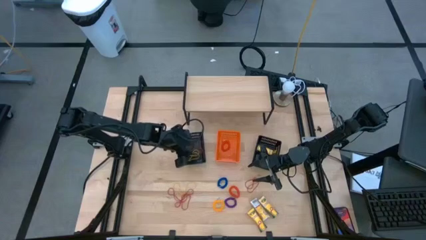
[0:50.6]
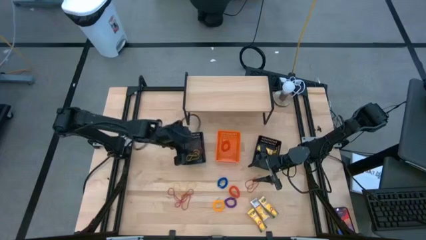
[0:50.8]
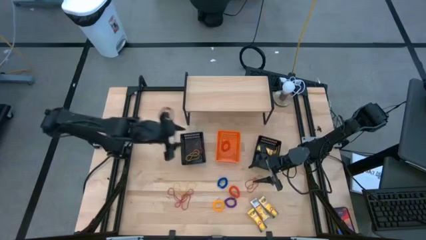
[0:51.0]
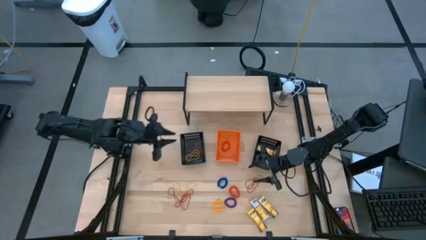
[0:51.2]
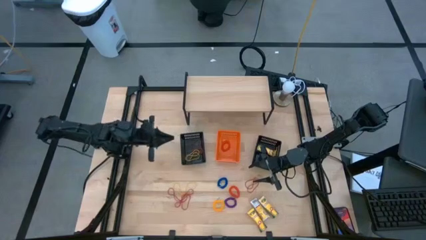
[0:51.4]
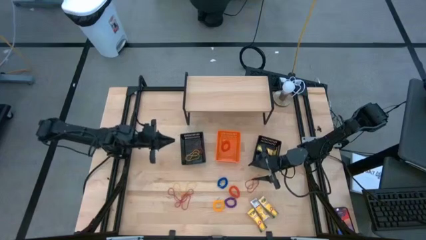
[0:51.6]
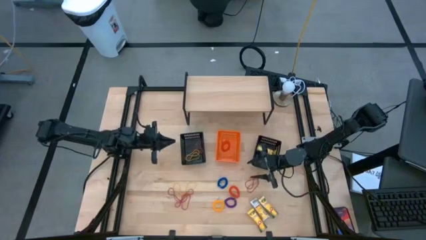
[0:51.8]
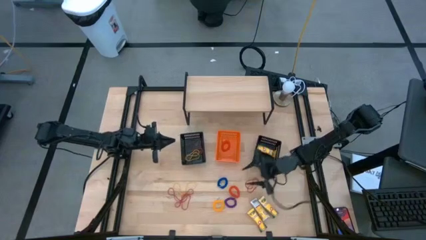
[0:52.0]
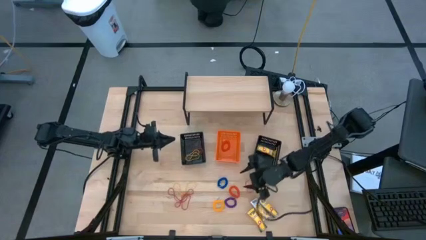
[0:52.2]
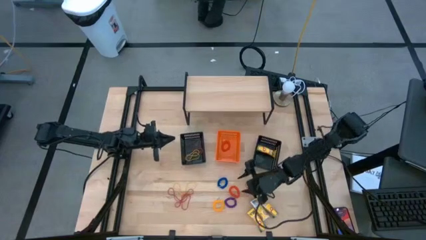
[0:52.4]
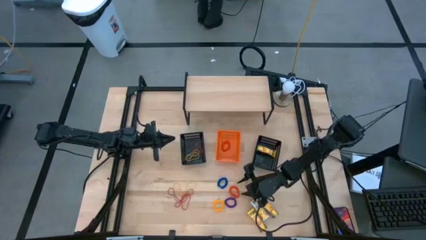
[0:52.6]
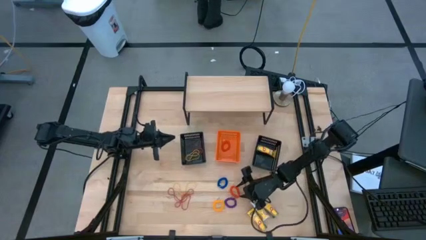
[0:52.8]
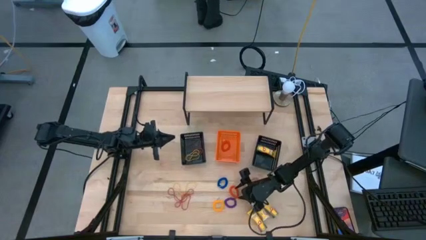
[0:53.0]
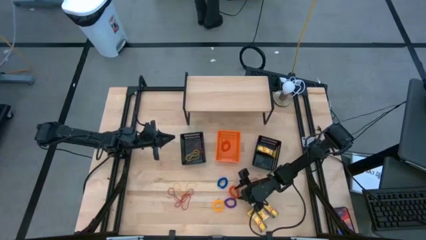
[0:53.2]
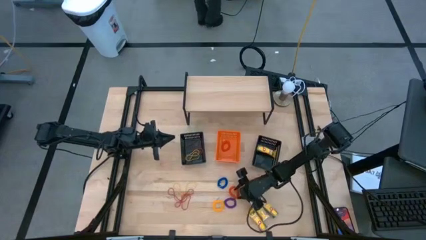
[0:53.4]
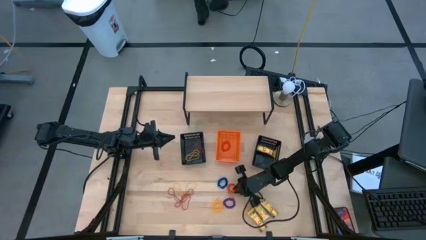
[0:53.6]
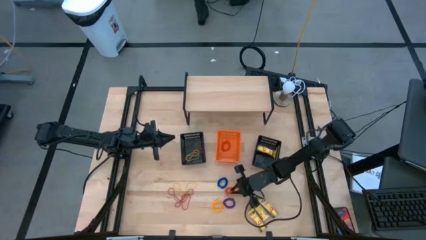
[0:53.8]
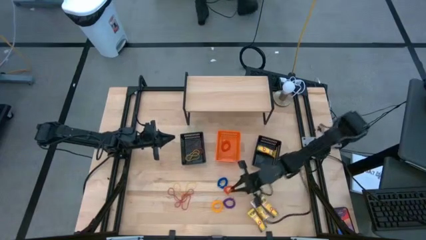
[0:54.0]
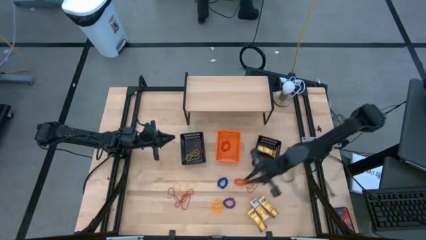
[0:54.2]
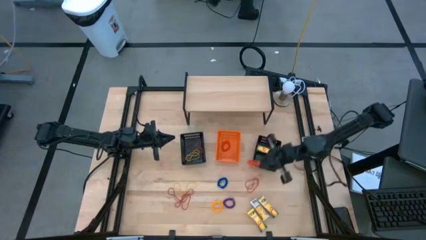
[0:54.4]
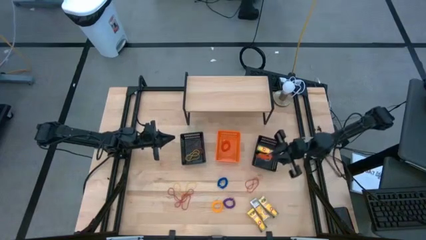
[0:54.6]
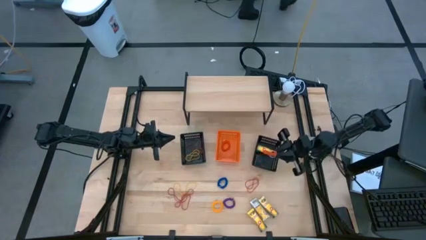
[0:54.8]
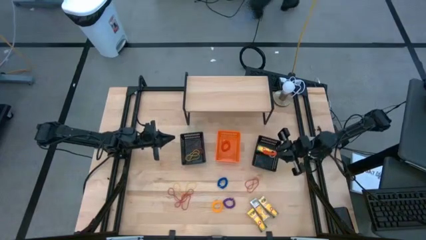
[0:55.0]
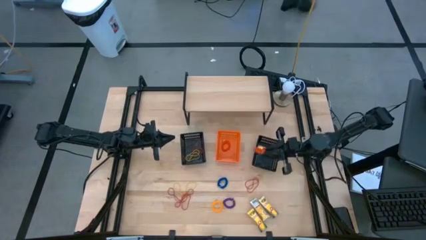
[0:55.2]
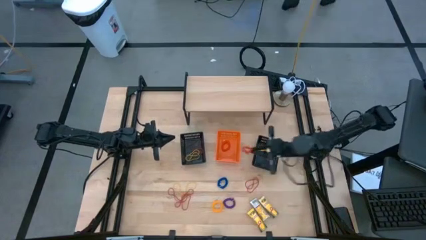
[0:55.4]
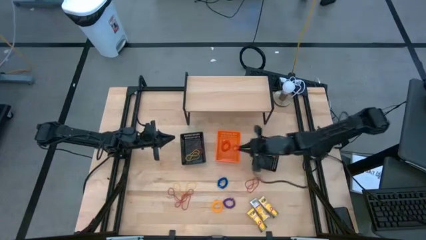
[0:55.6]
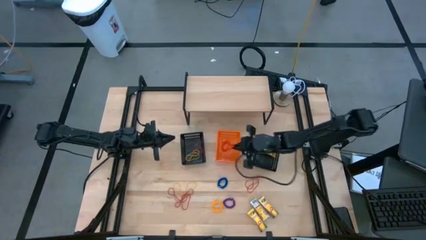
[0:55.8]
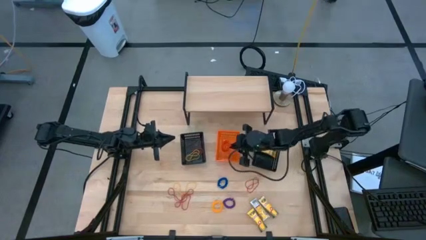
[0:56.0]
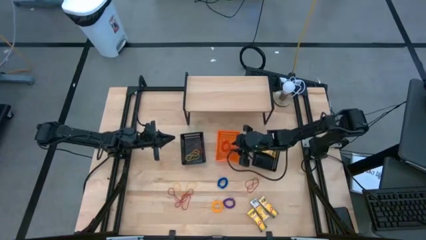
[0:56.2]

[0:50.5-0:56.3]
Task: Pick & Place Office Desk Supplies
Put the orange spring rubber band into the orange bin

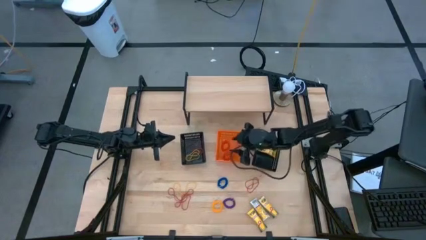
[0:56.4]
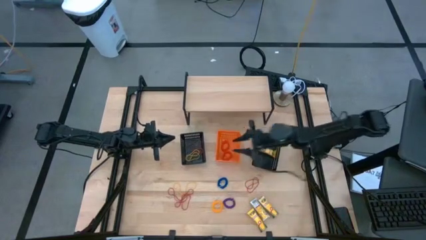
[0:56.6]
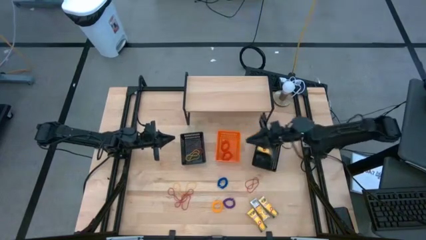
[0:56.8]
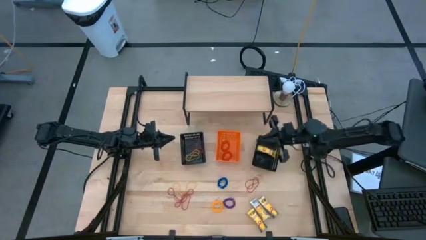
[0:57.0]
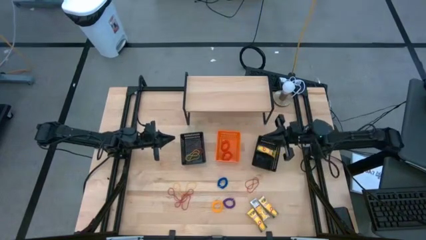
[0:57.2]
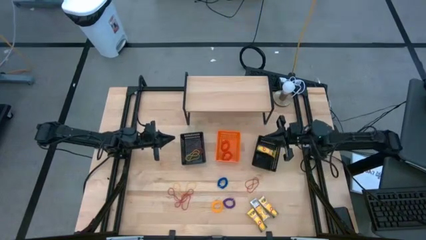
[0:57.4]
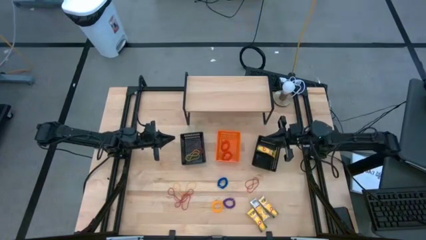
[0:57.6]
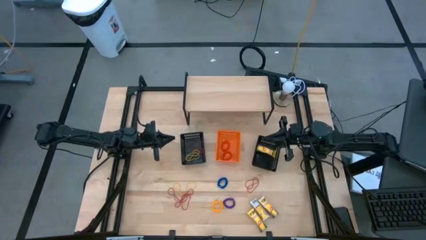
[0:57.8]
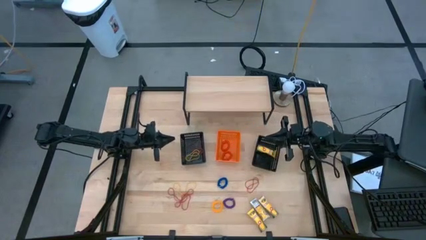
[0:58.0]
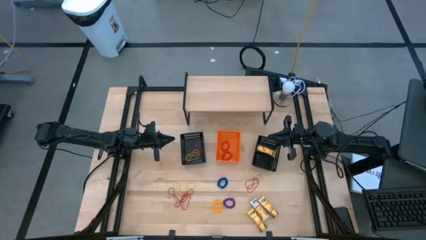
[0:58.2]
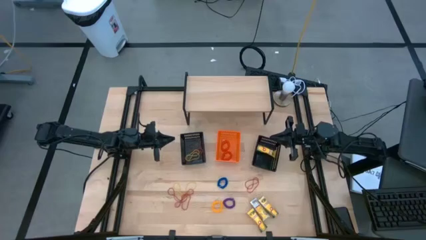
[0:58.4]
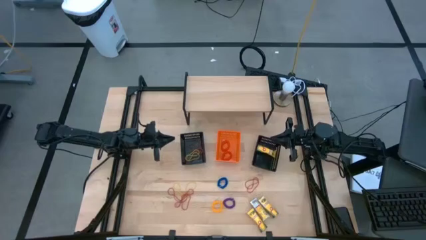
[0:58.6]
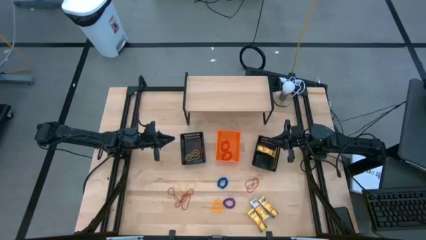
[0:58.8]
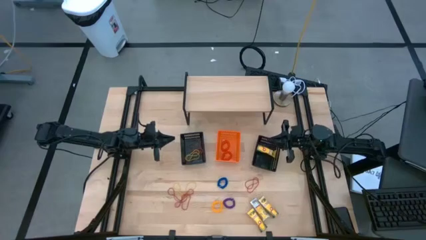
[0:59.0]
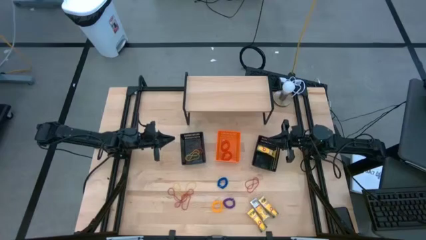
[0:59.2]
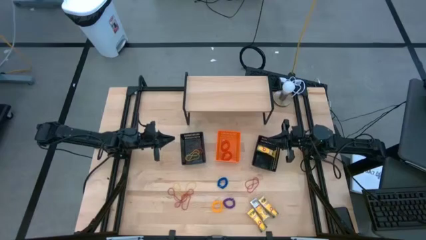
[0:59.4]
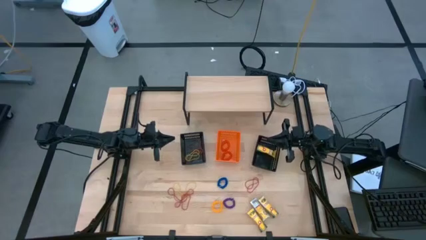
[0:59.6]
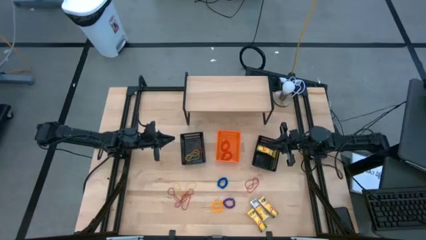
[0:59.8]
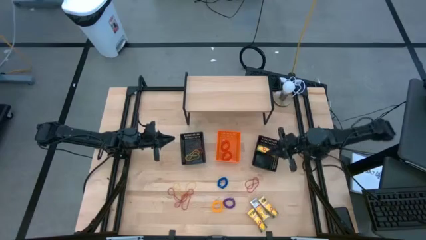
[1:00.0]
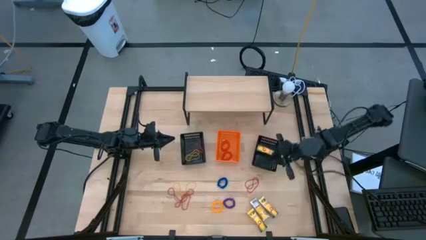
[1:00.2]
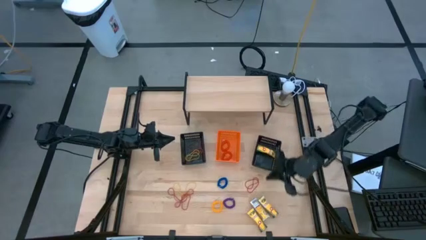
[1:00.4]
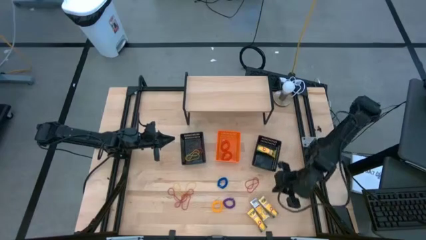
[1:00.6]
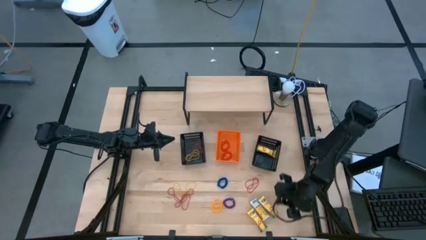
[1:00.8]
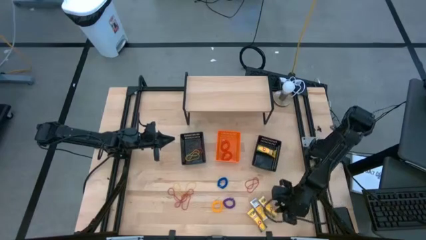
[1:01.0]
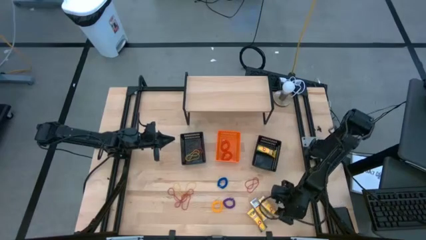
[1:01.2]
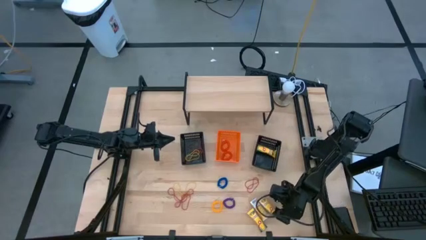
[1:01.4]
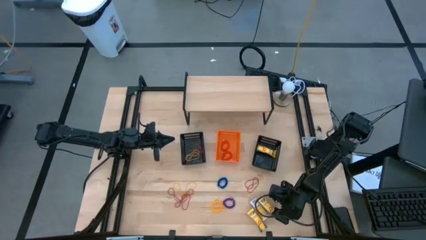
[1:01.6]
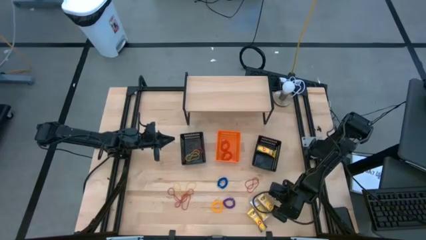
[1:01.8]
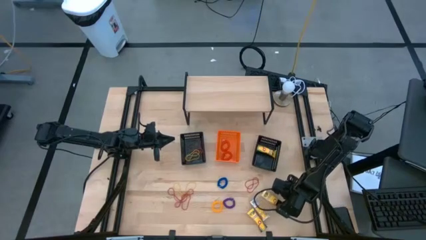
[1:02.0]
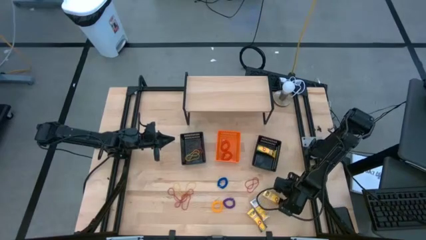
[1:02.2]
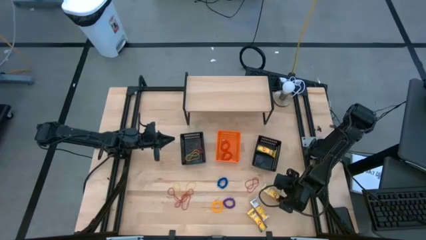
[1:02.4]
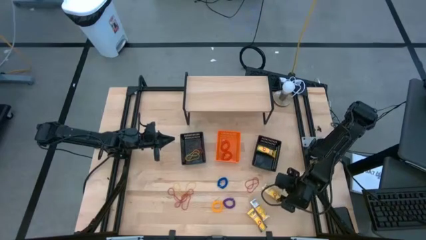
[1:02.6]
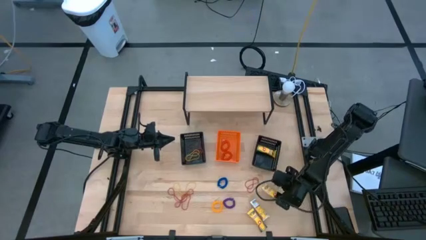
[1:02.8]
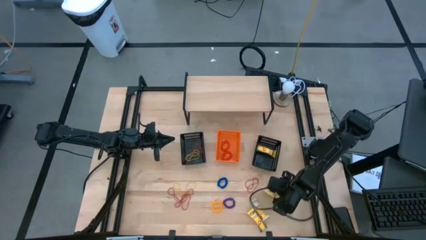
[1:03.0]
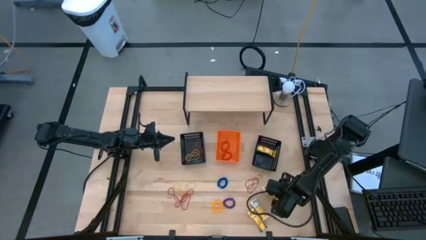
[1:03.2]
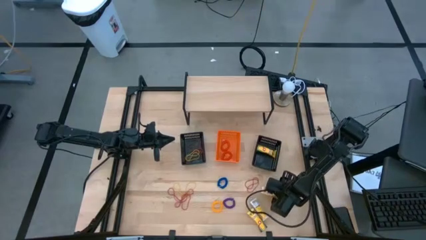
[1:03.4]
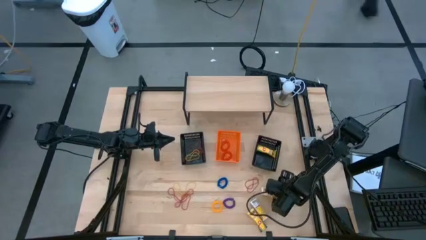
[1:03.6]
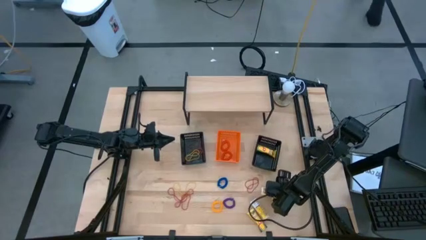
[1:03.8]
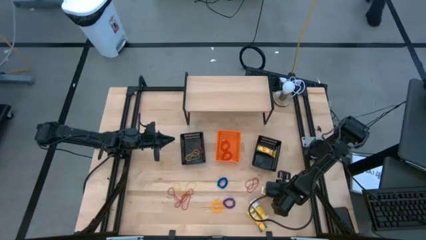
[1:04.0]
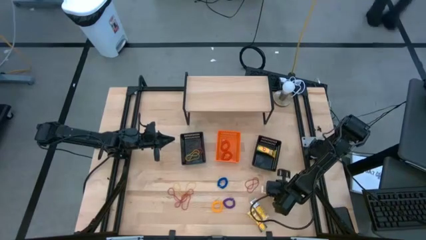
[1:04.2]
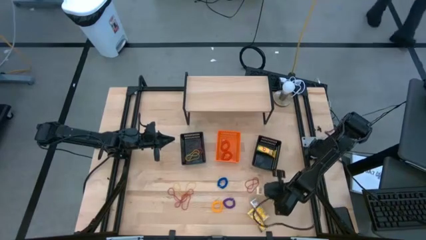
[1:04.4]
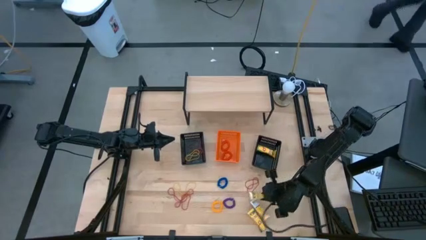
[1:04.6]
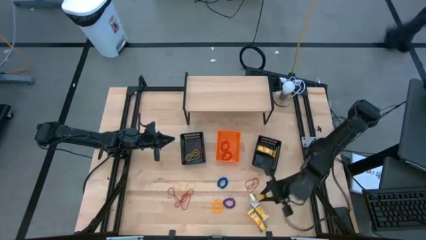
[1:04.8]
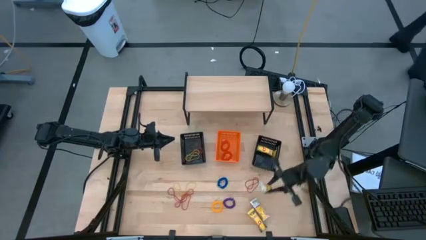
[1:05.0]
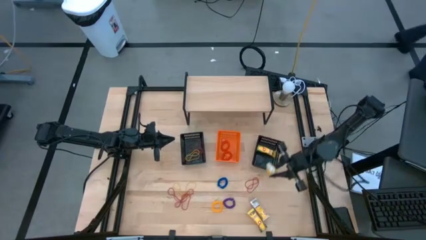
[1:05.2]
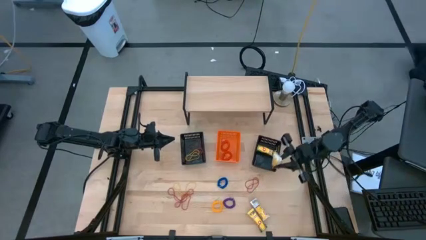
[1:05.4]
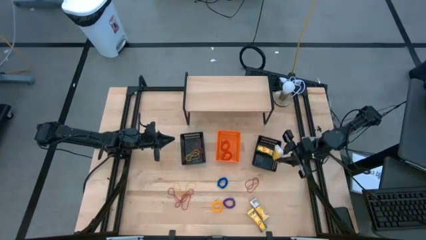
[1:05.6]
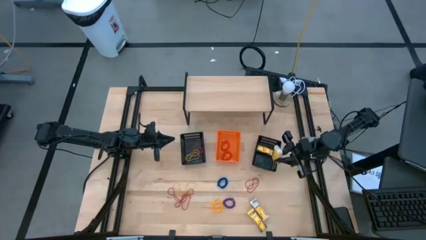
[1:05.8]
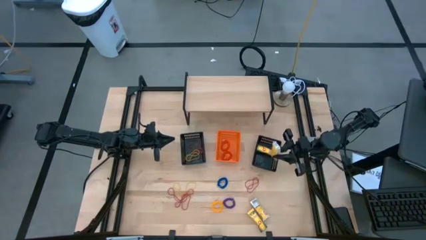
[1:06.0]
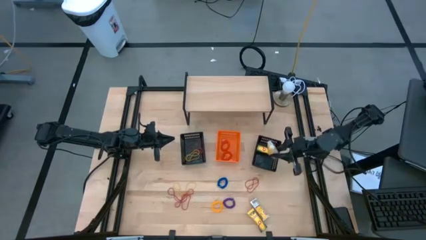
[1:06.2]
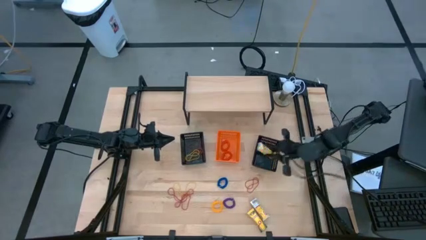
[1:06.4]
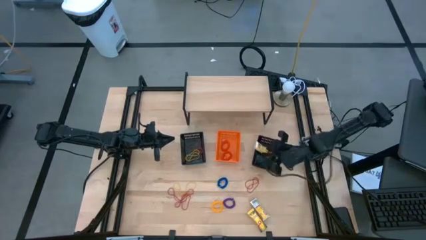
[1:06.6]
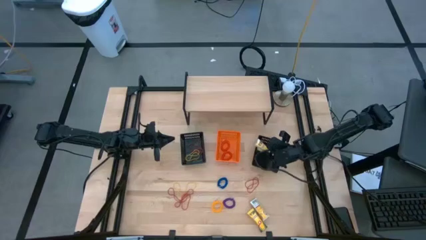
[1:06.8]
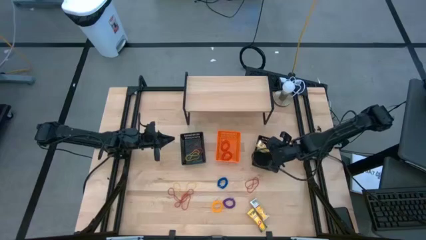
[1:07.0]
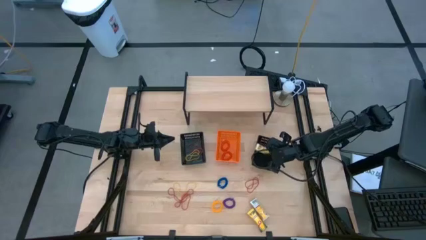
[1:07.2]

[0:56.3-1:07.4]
Put the crayon box into the right black bin
